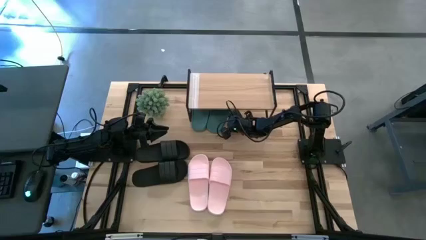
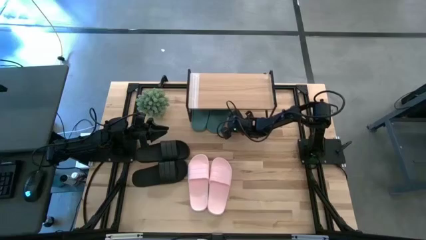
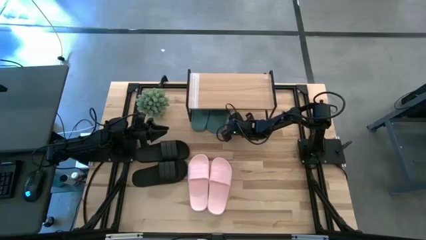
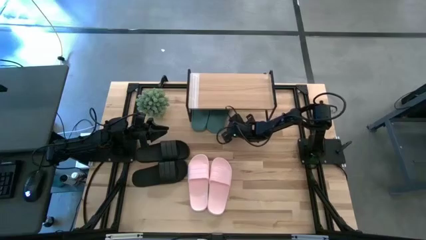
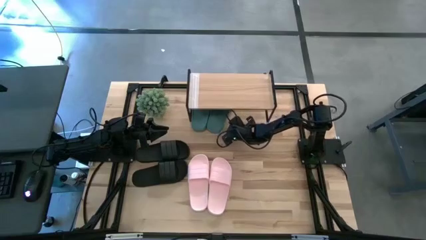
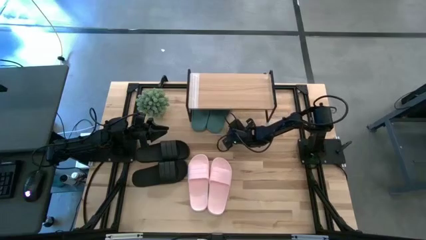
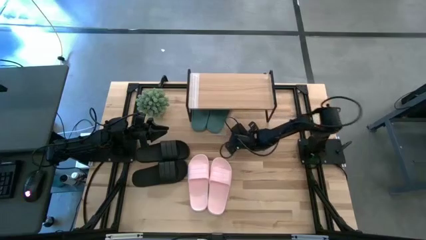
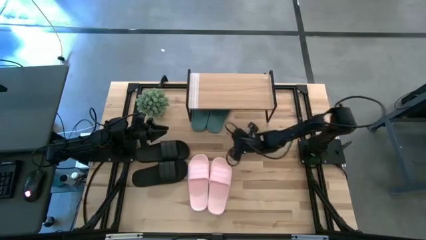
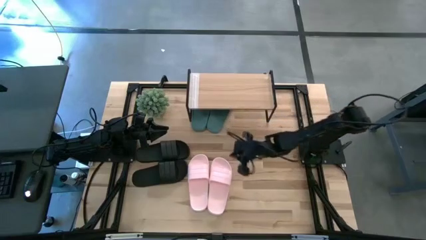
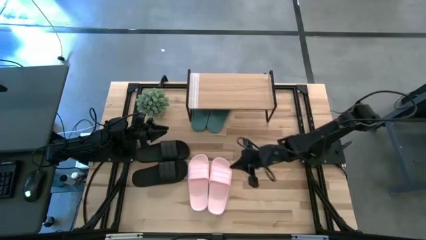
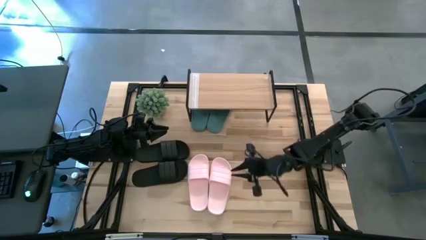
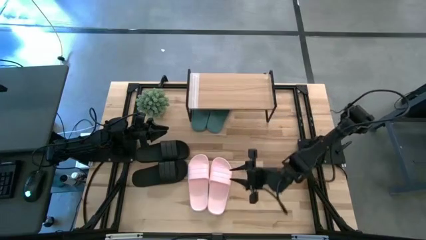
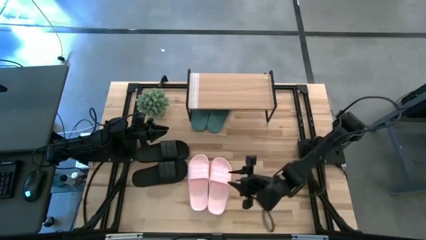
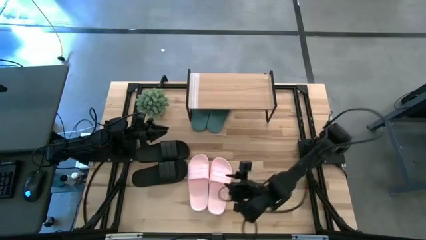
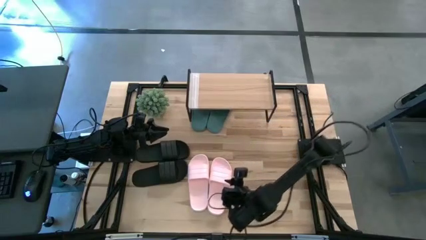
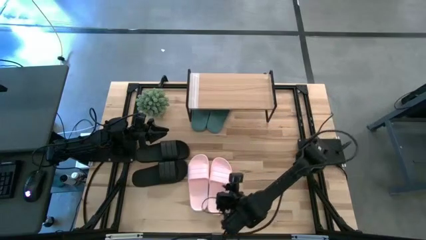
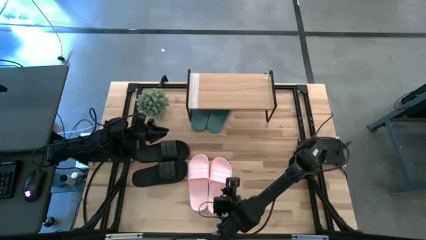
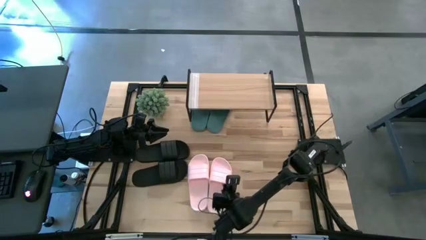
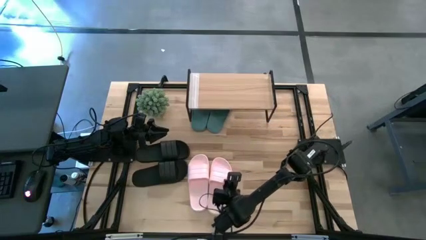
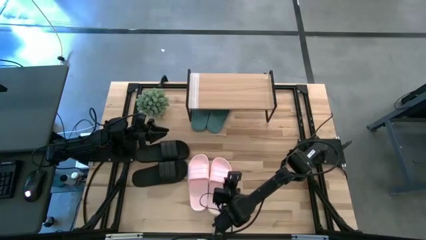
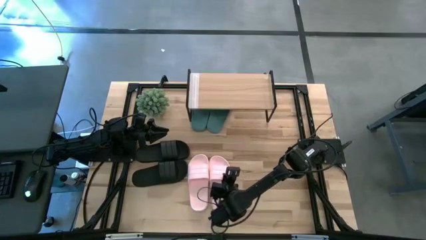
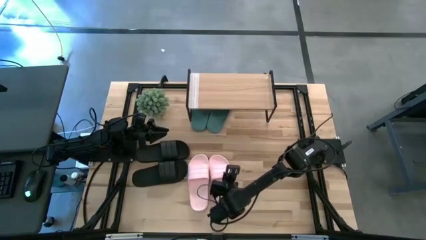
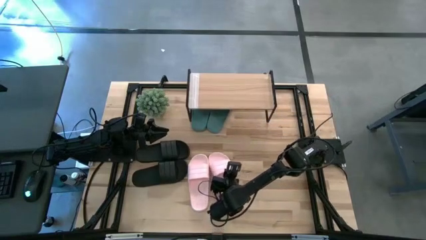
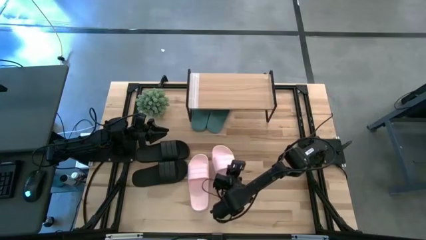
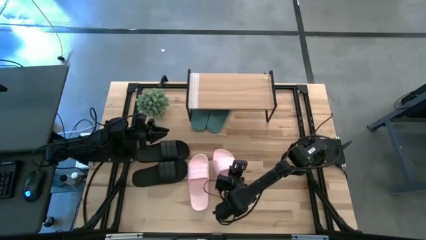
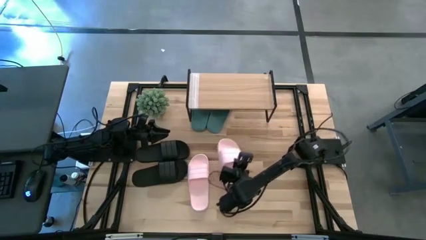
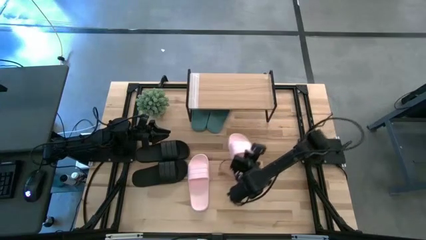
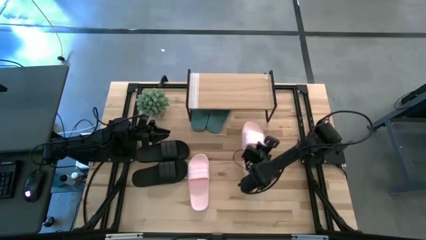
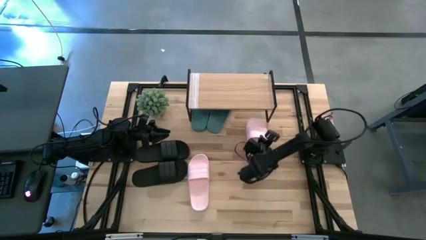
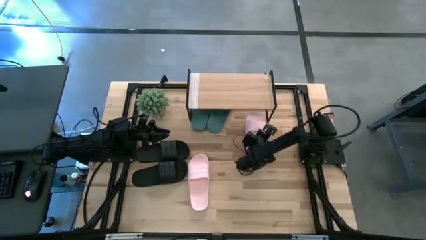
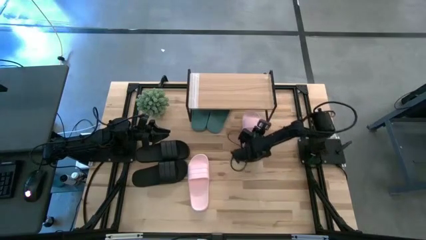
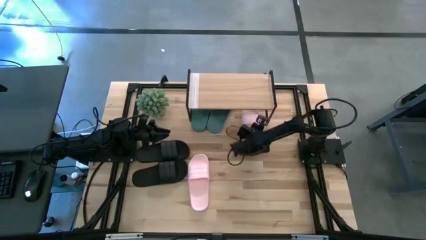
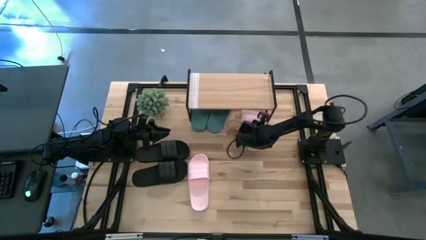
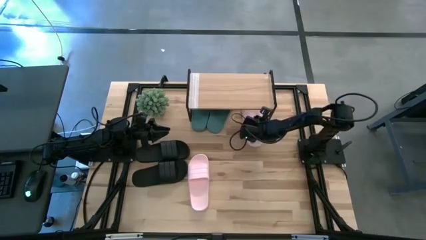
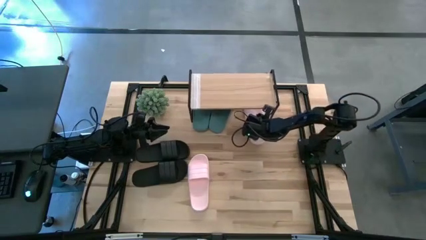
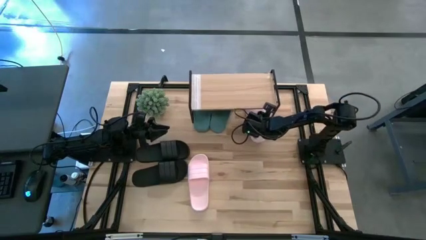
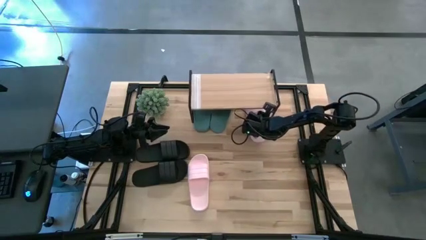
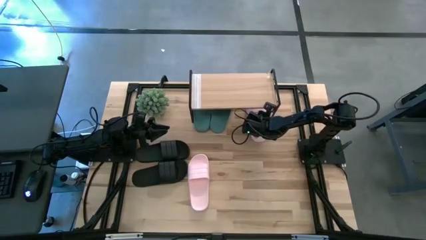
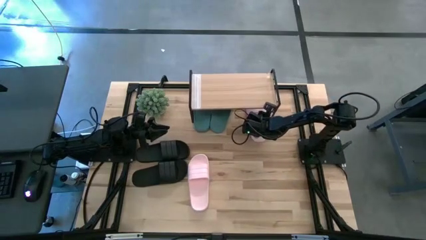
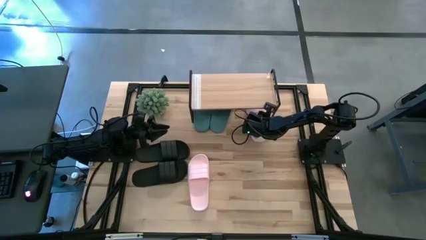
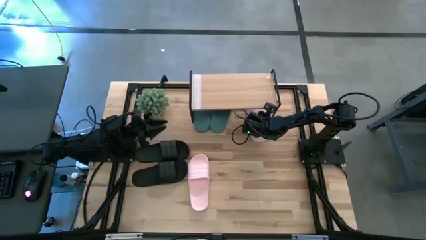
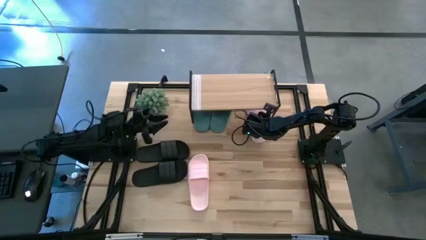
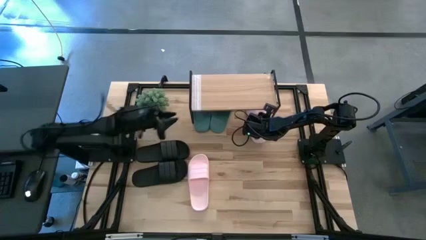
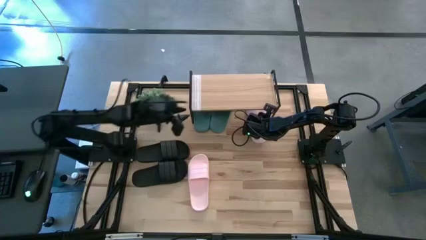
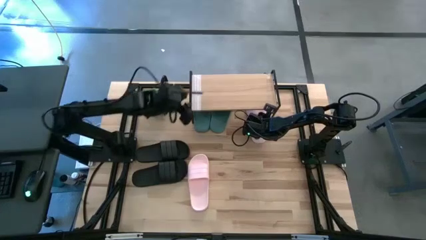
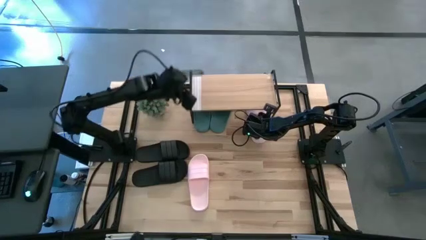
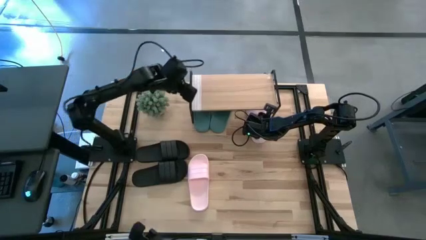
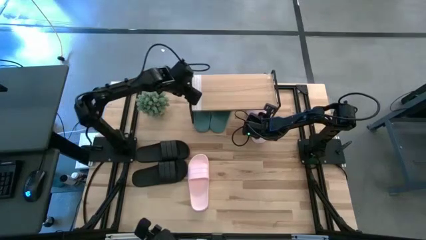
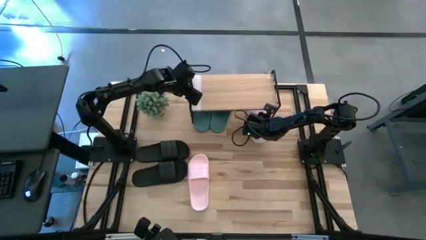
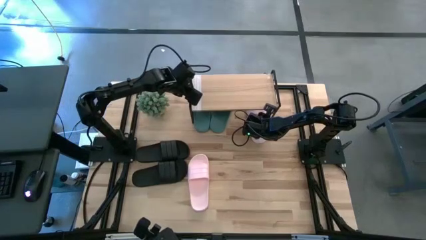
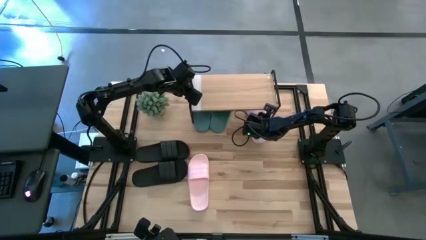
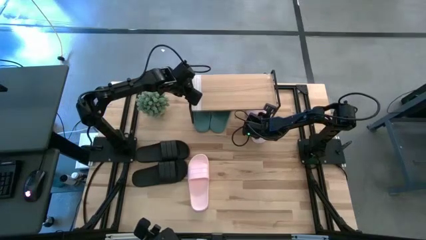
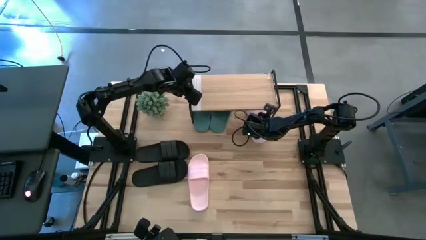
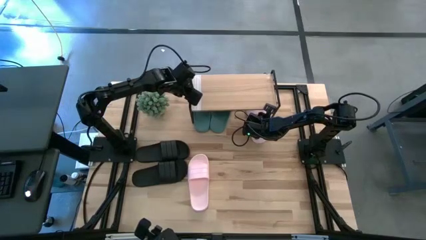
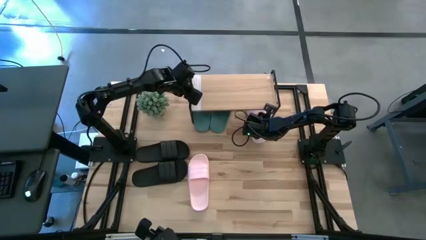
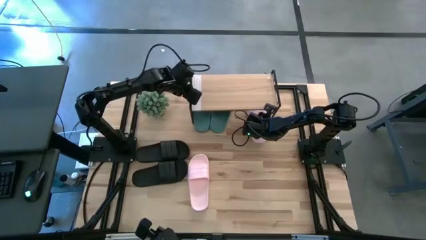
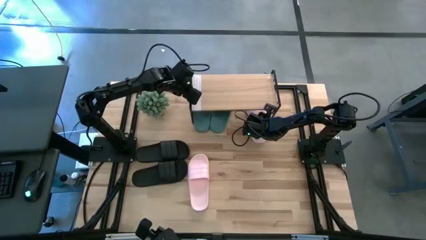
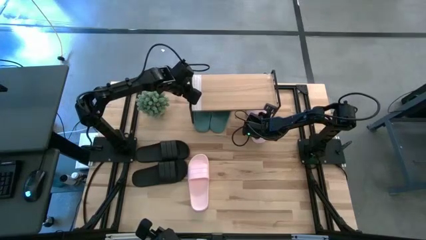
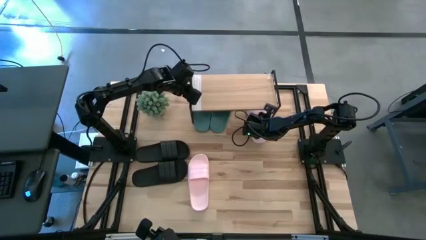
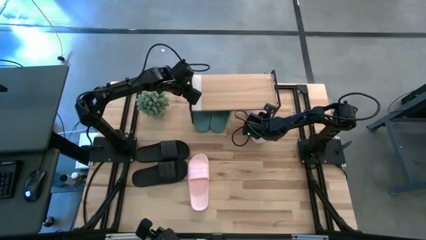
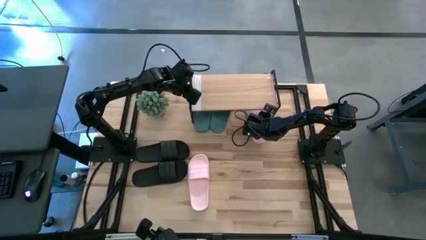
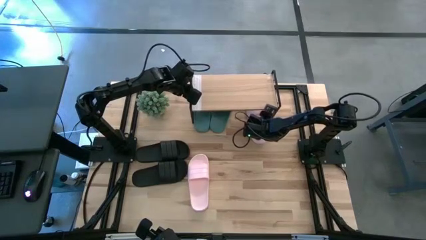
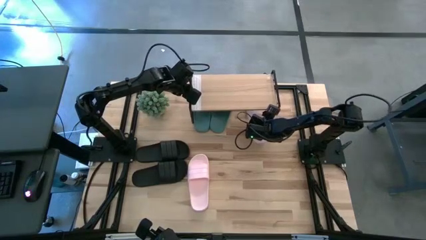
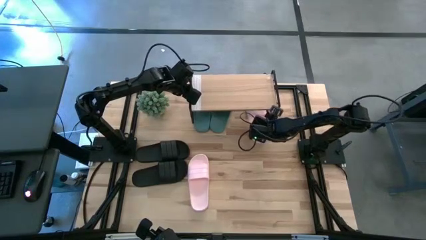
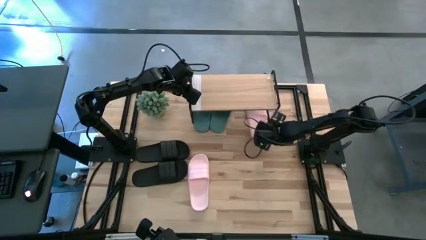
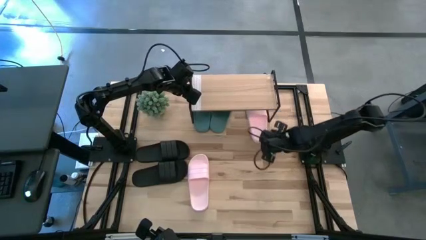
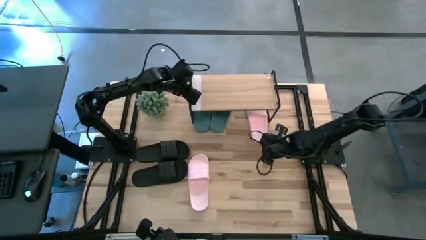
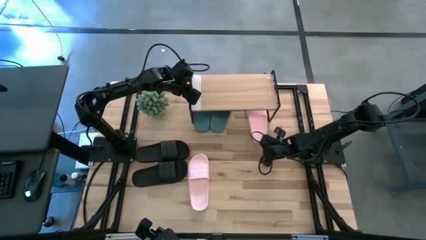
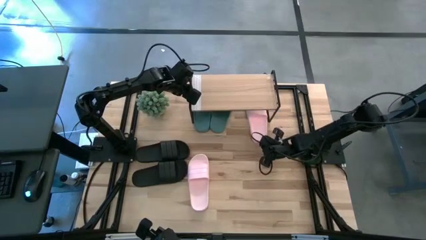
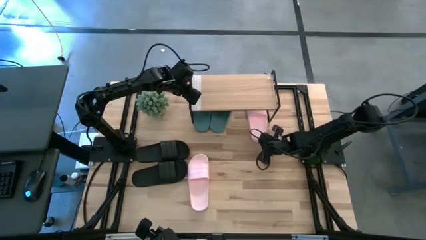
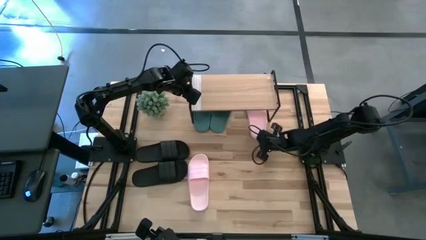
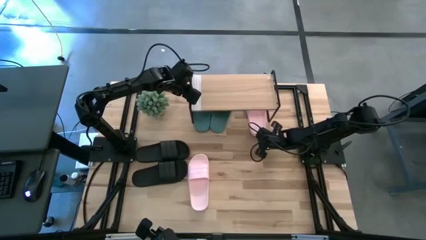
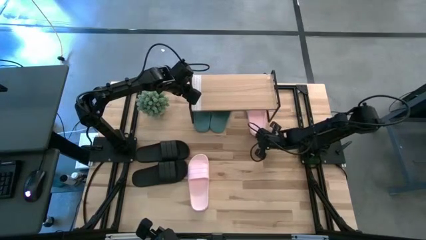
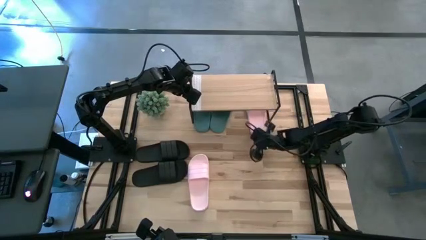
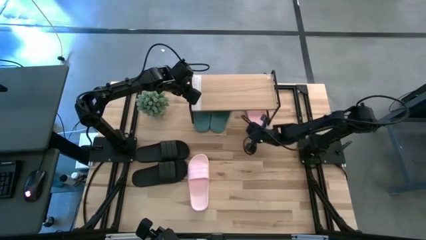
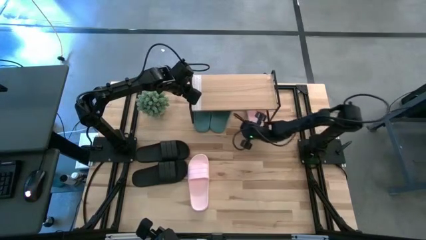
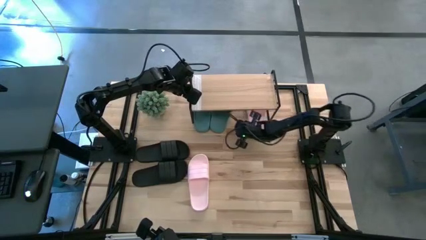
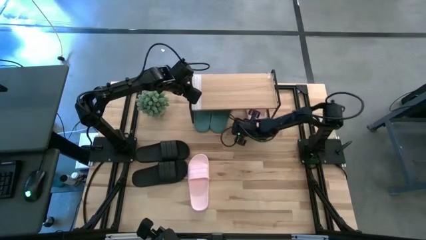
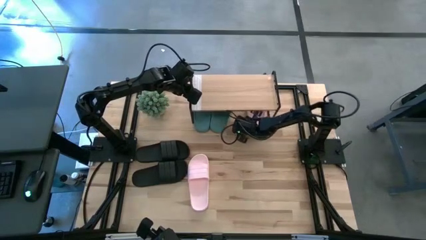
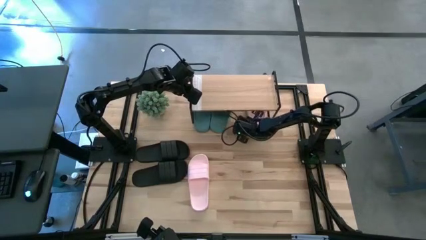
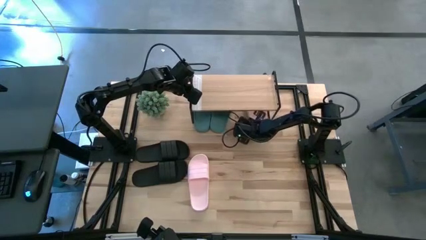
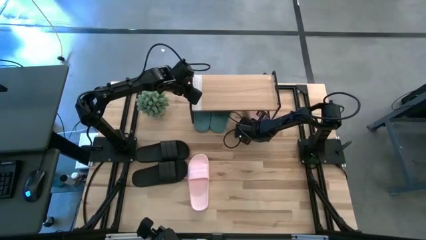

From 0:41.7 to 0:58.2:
Task: Pick and place slides into the shelf
Put the right pink slides under the shelf
